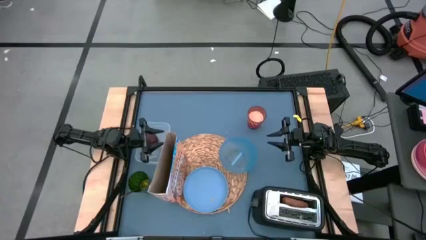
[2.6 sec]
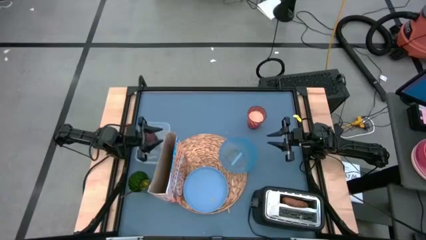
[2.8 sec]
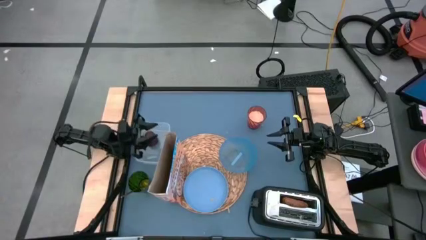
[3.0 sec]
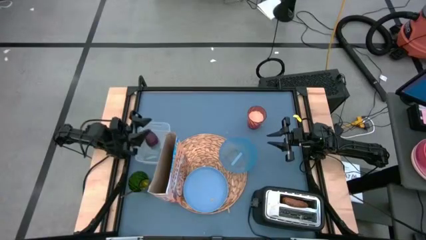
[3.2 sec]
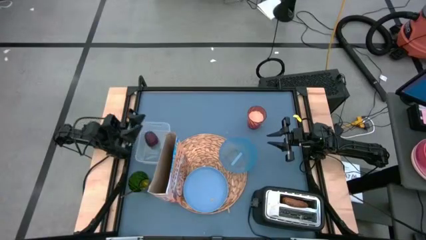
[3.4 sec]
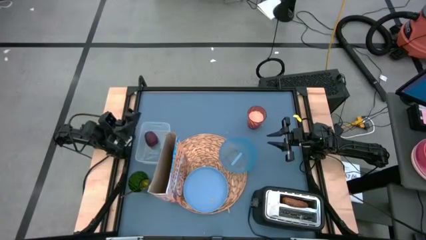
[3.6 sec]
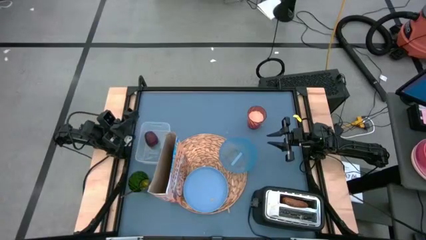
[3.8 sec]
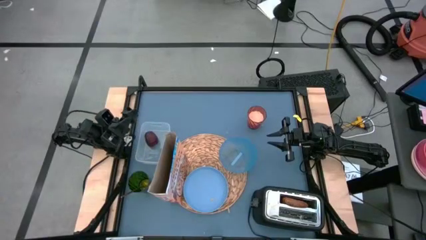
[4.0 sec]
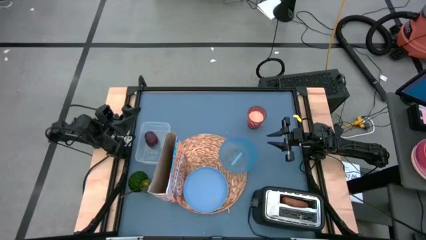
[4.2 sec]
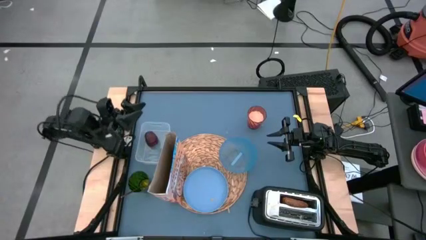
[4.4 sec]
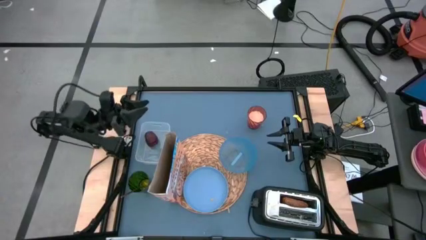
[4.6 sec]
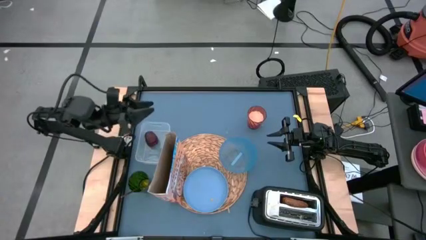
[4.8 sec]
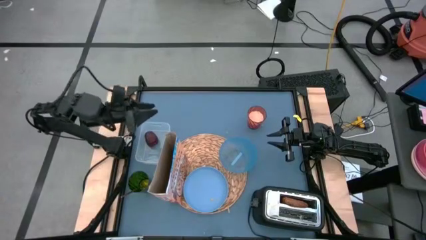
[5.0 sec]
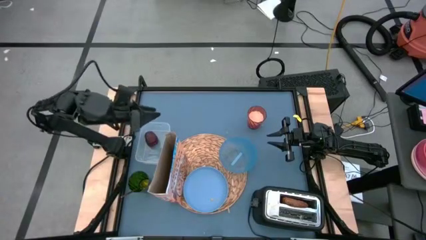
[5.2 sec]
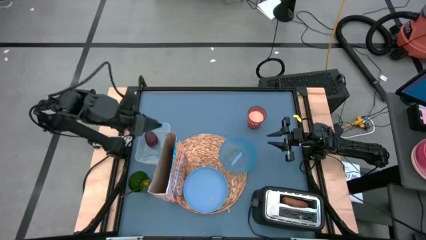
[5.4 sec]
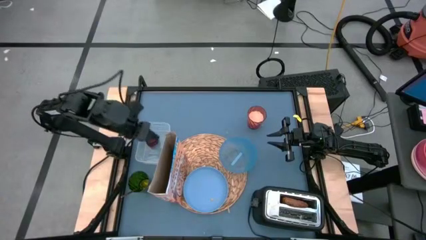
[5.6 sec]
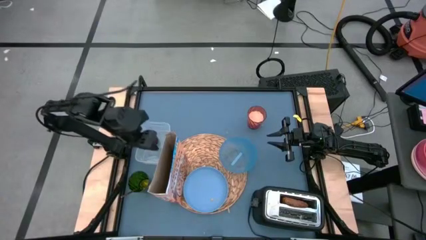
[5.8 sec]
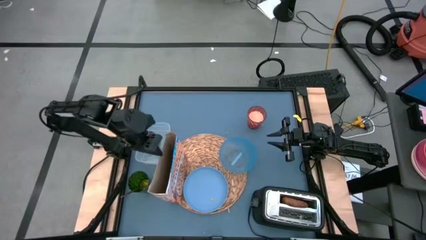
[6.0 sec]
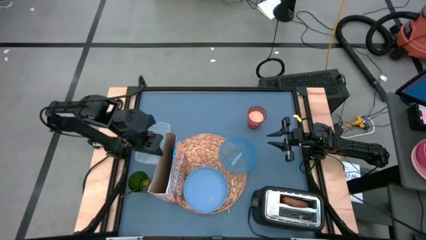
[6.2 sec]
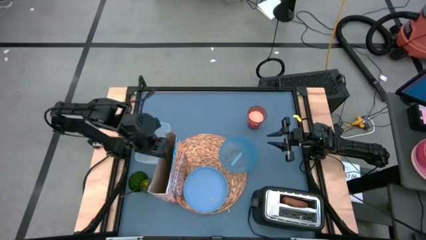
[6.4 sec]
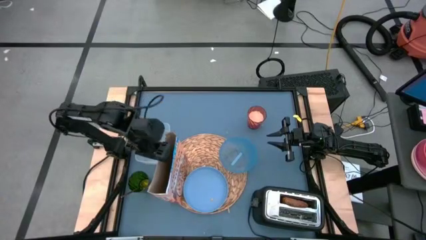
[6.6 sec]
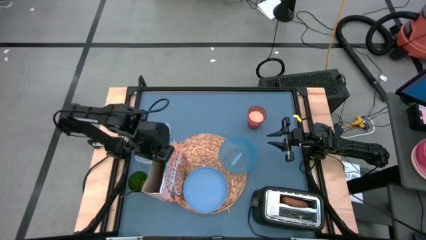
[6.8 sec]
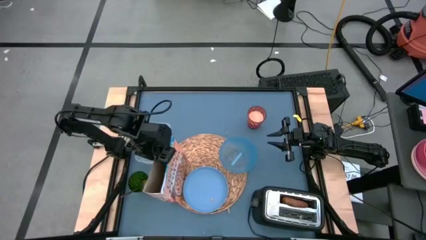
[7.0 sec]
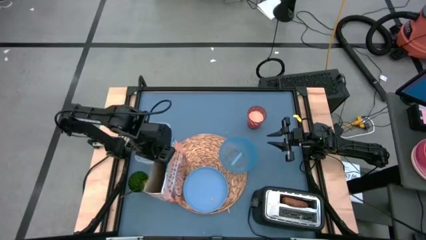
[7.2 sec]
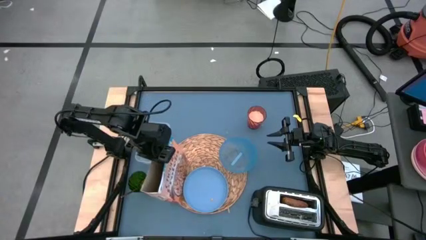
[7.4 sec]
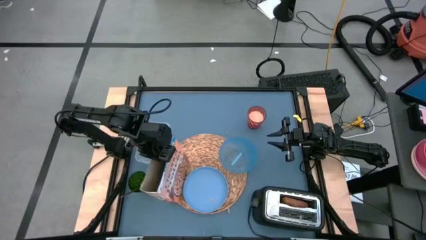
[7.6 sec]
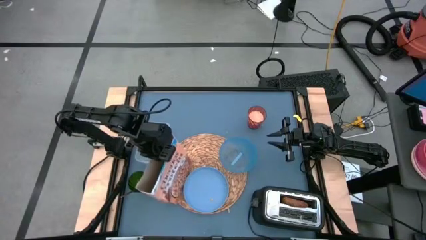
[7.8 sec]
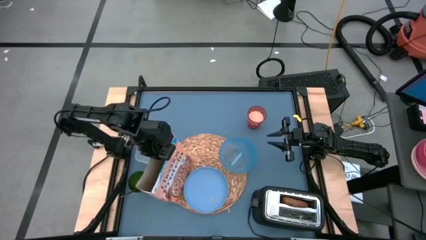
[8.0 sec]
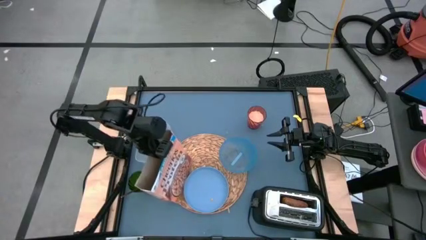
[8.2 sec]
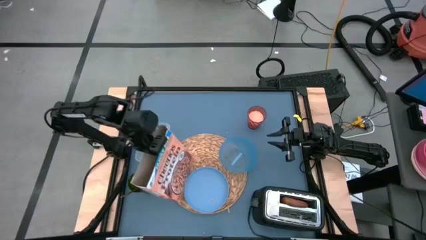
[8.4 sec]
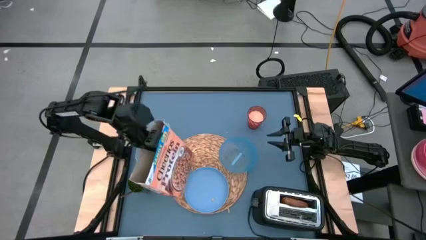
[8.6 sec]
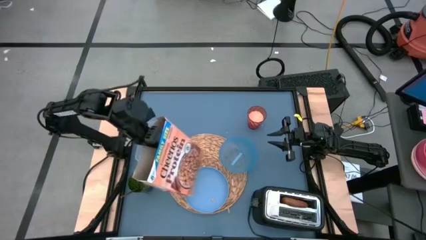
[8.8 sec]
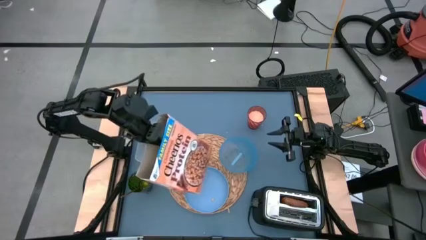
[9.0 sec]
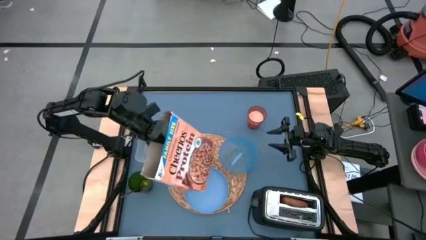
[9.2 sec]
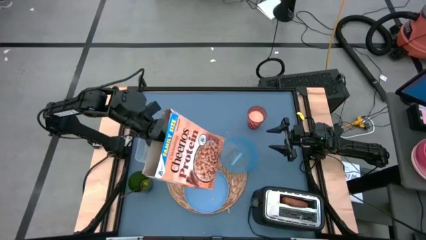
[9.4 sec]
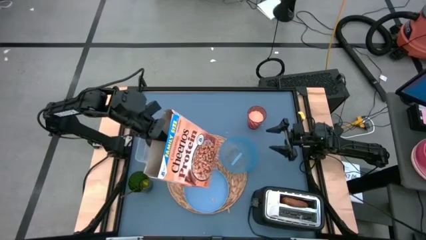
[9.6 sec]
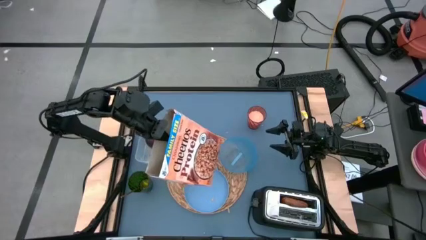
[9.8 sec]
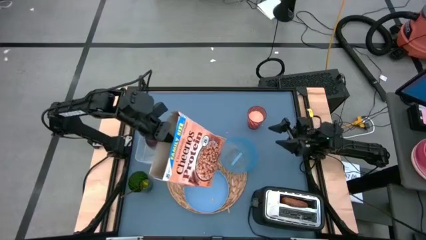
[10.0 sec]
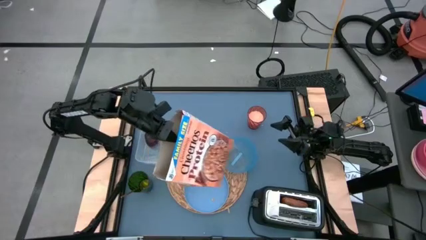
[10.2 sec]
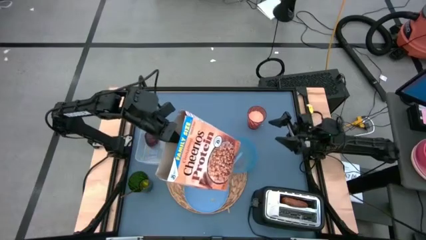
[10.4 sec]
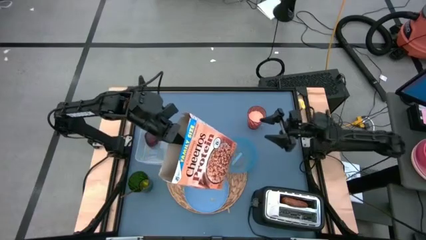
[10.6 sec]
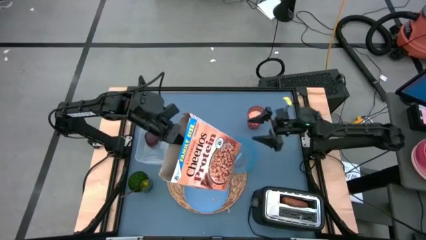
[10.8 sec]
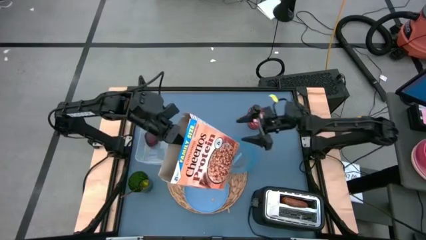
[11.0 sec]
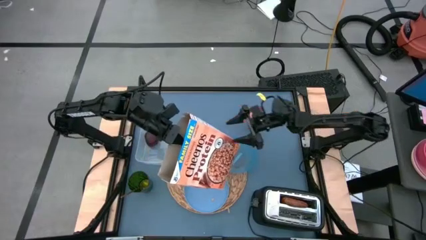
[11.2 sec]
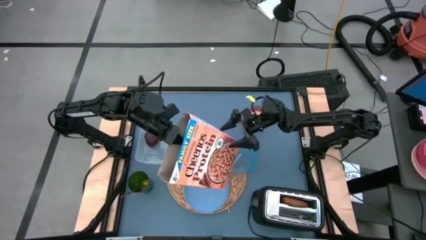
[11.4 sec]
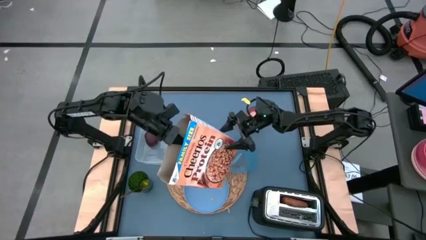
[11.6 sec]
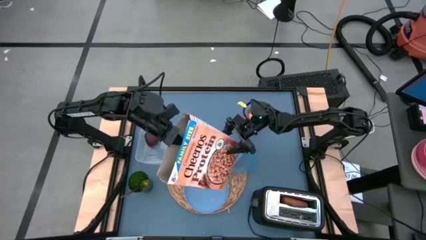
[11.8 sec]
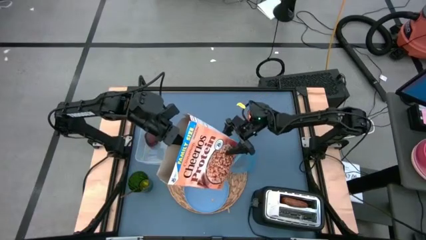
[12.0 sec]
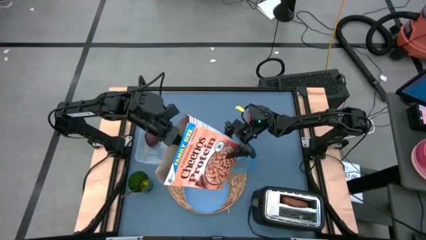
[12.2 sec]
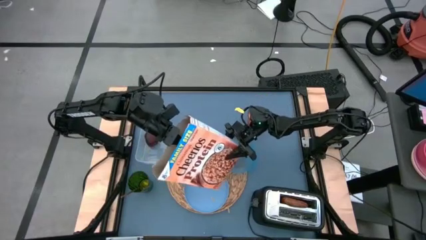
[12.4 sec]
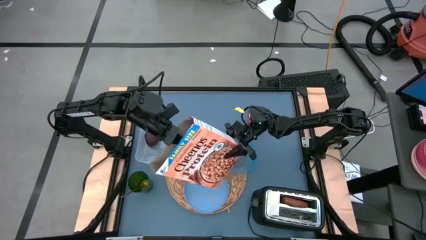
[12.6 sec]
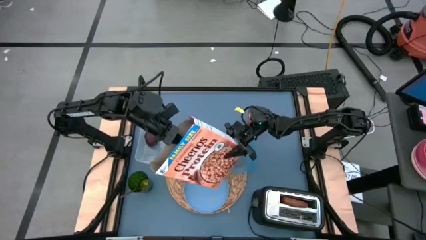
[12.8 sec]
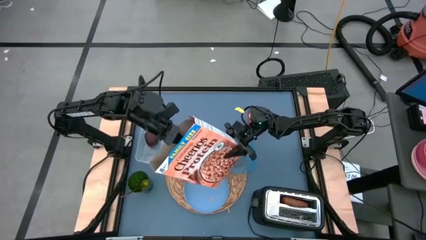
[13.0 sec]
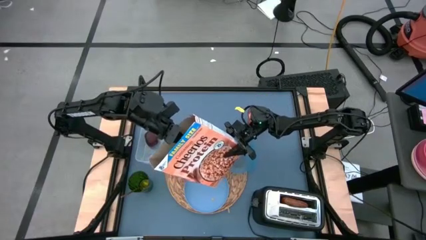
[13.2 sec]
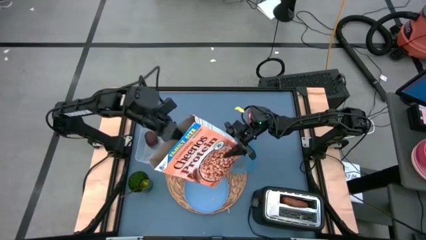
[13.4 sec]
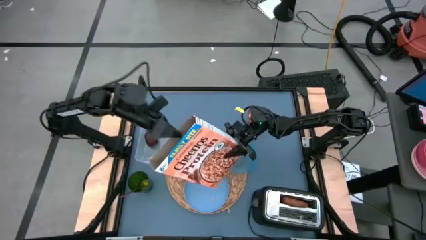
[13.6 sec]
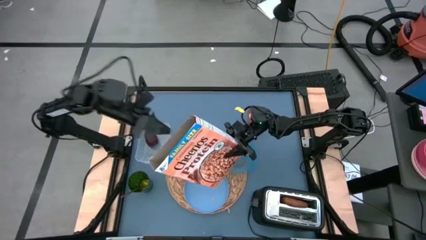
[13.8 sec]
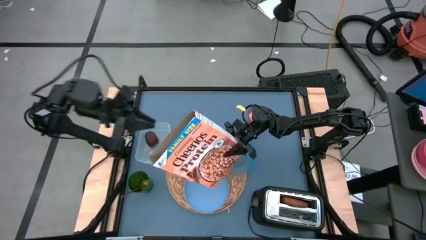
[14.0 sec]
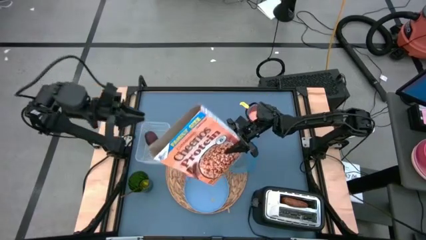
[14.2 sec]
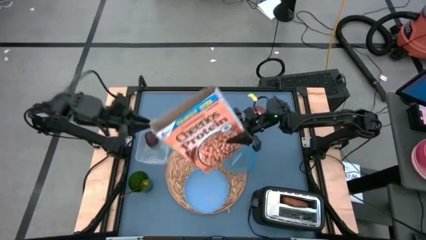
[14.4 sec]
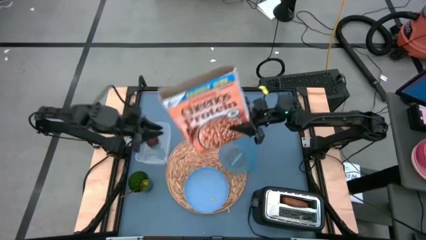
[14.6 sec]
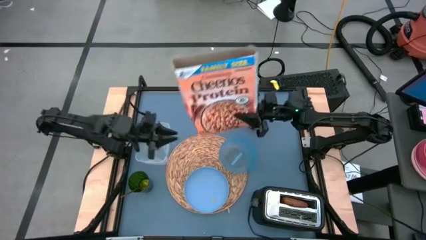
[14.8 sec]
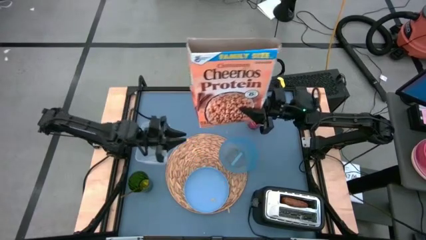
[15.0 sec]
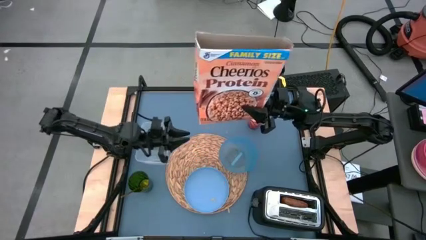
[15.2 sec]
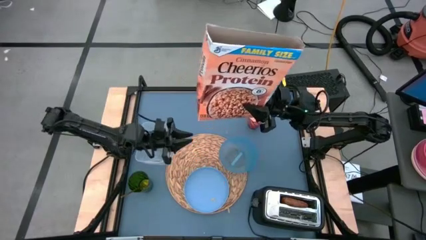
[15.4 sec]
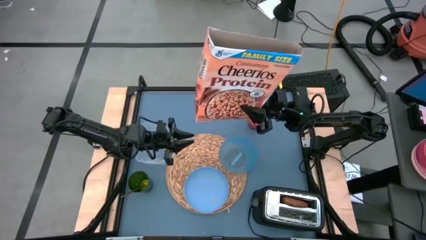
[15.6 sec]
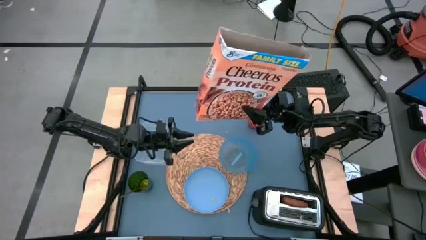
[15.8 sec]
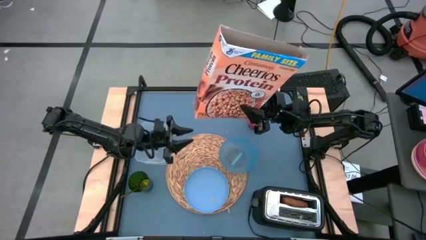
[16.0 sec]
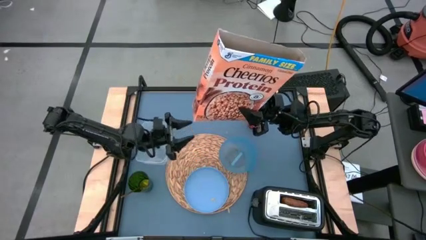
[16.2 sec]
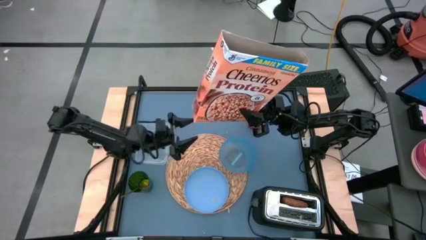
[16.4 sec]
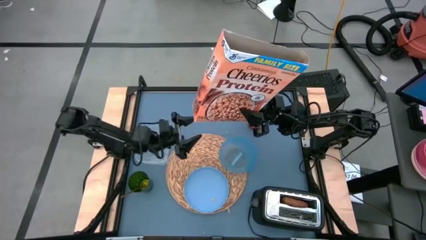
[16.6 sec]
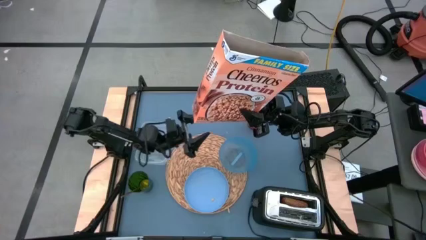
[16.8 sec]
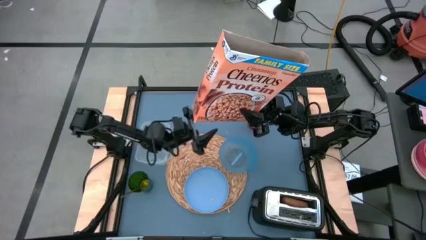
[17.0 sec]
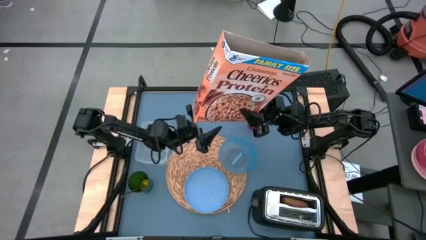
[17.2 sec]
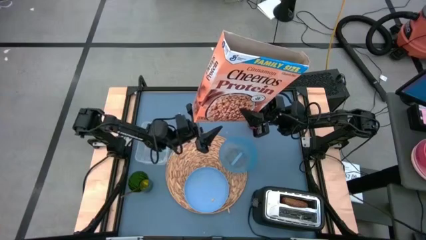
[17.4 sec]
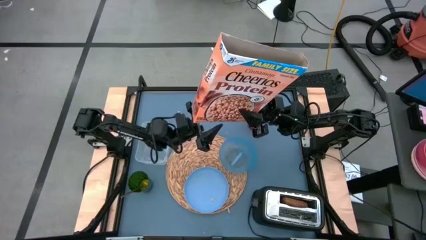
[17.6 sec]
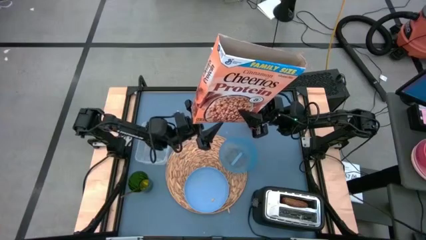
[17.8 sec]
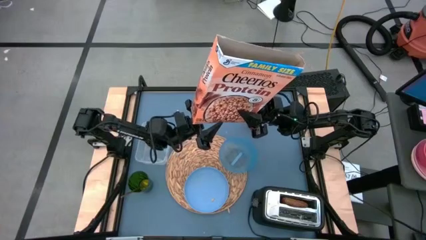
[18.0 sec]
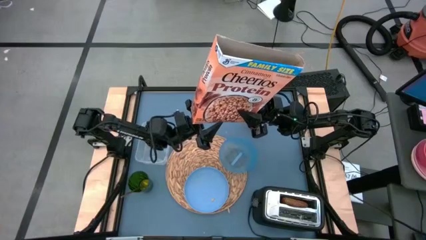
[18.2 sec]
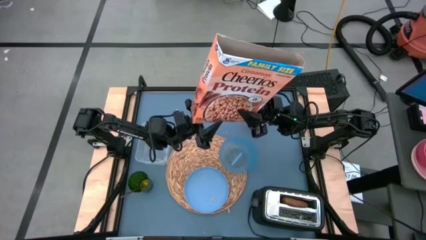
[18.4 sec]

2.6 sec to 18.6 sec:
Task: Arrange a breakfast setting
Pour the cereal into the blue bowl
